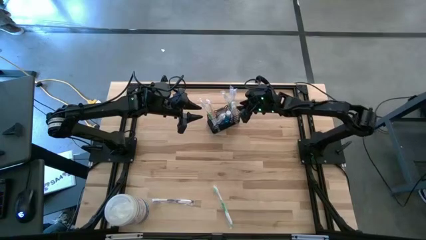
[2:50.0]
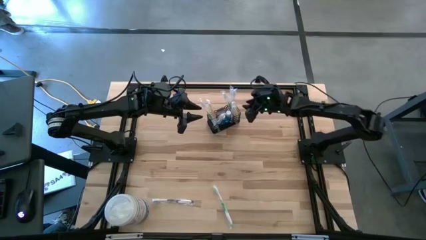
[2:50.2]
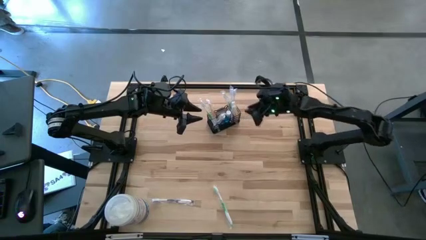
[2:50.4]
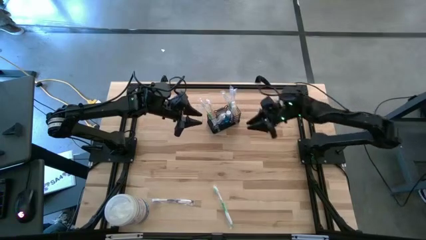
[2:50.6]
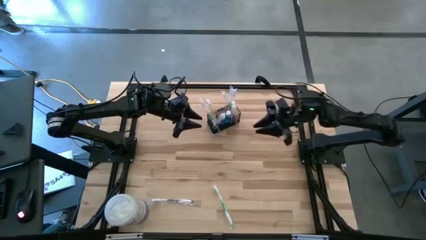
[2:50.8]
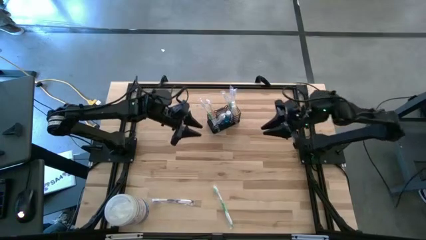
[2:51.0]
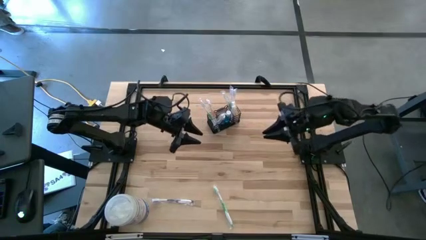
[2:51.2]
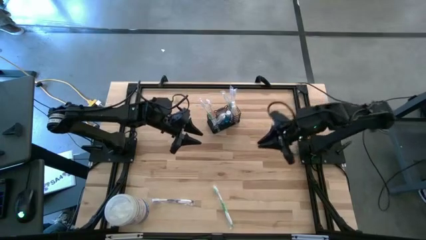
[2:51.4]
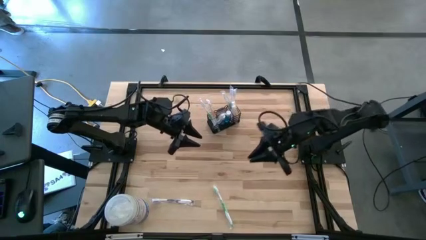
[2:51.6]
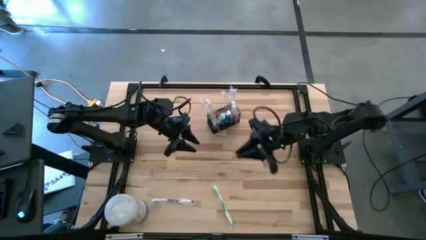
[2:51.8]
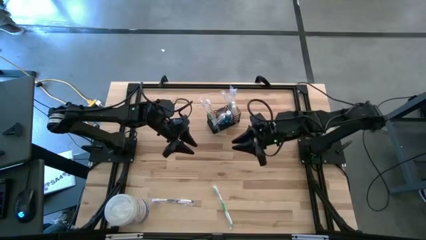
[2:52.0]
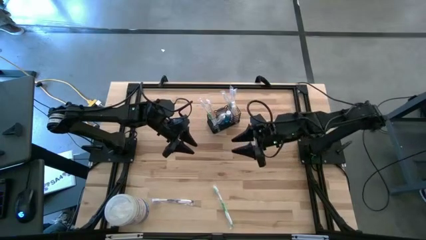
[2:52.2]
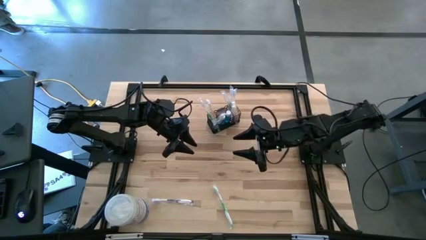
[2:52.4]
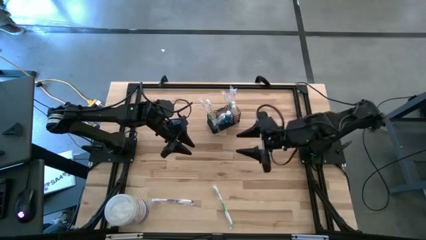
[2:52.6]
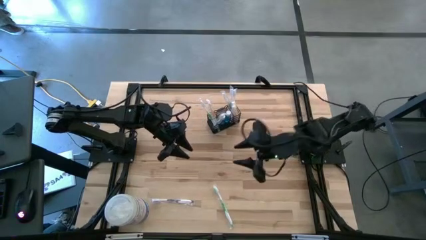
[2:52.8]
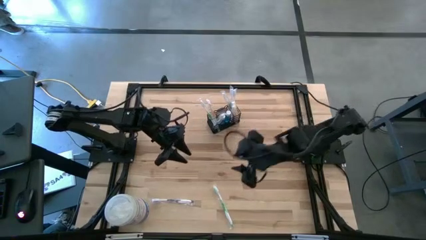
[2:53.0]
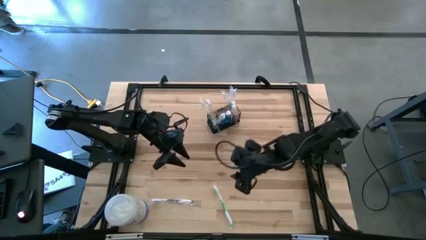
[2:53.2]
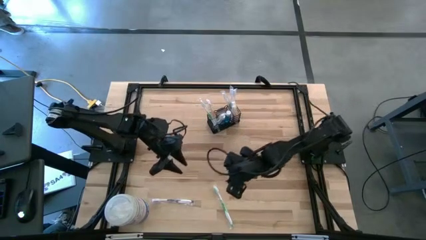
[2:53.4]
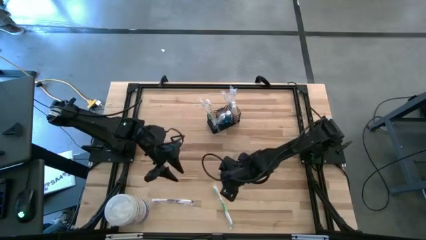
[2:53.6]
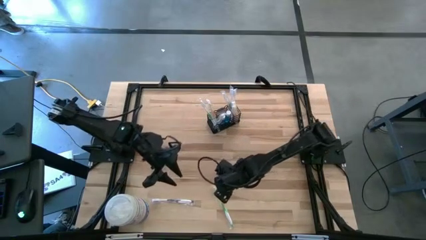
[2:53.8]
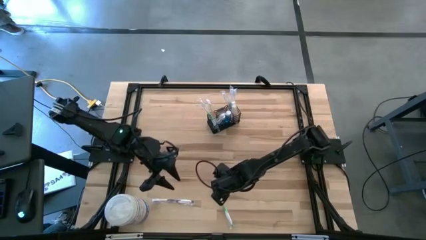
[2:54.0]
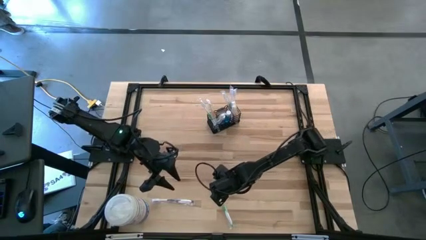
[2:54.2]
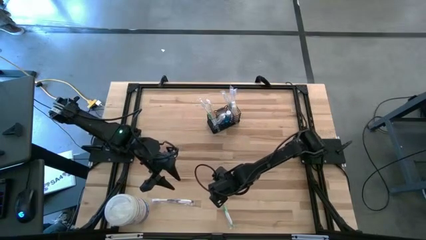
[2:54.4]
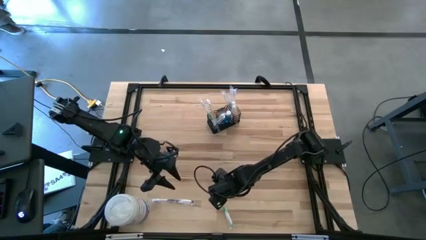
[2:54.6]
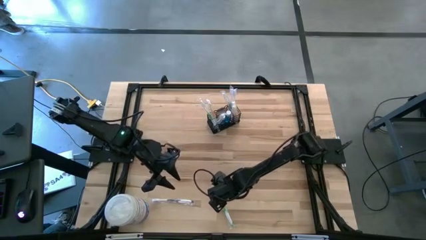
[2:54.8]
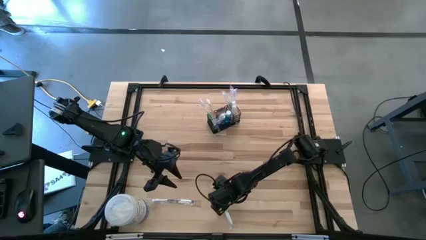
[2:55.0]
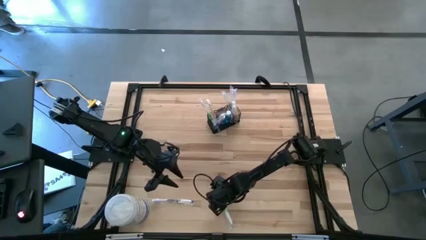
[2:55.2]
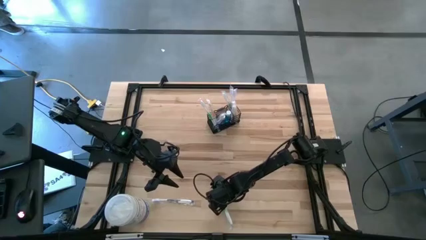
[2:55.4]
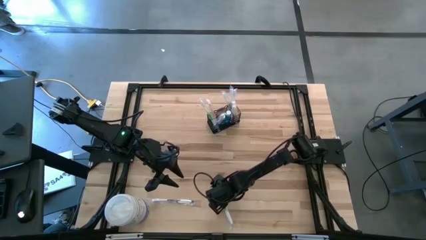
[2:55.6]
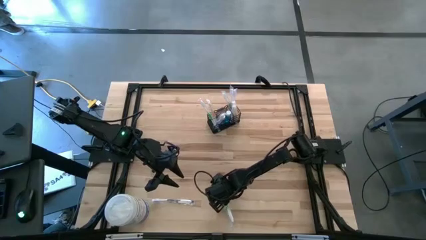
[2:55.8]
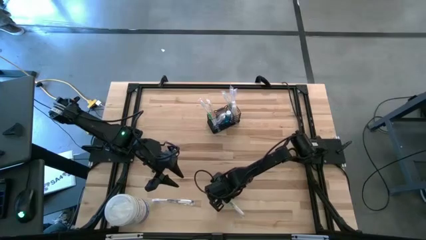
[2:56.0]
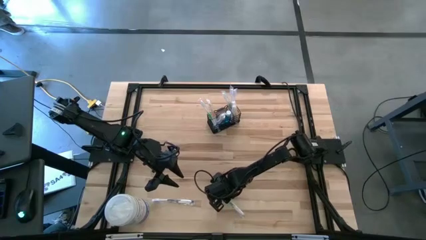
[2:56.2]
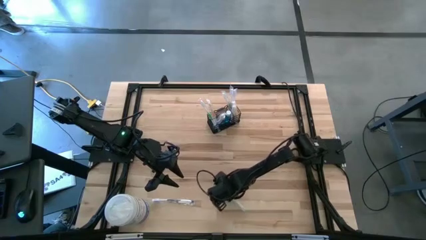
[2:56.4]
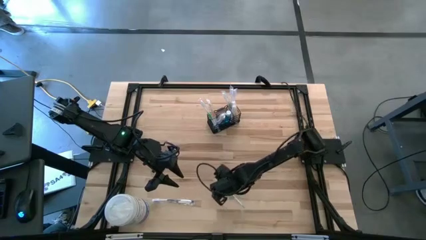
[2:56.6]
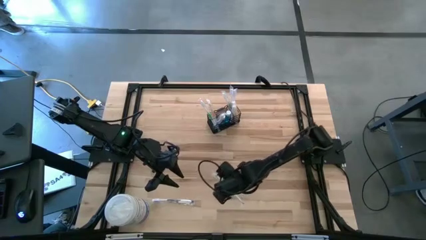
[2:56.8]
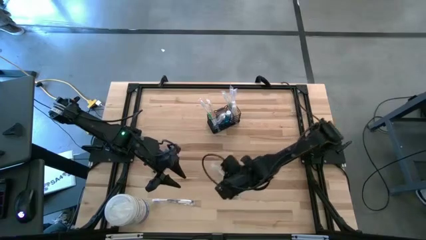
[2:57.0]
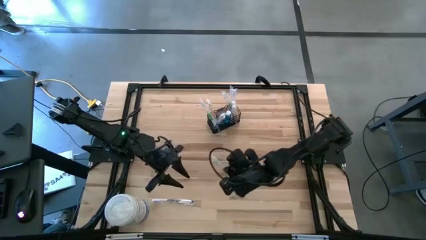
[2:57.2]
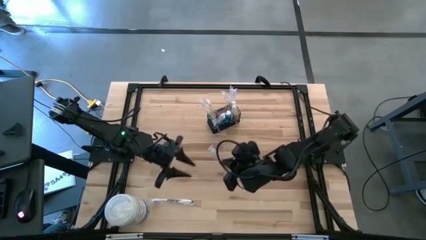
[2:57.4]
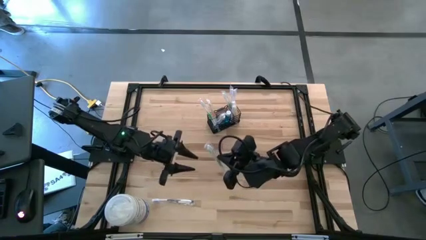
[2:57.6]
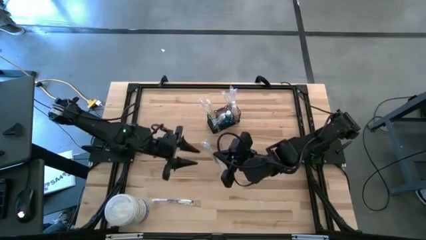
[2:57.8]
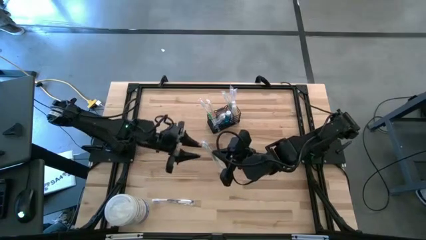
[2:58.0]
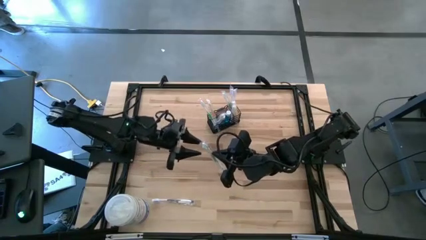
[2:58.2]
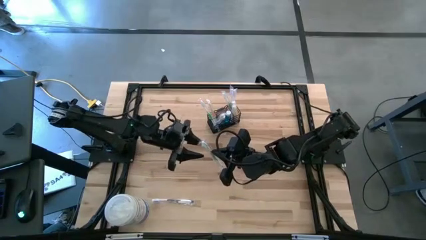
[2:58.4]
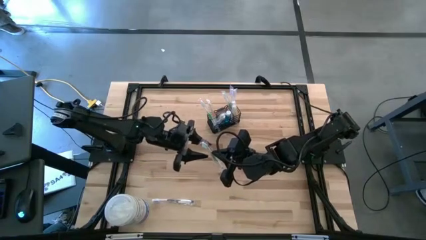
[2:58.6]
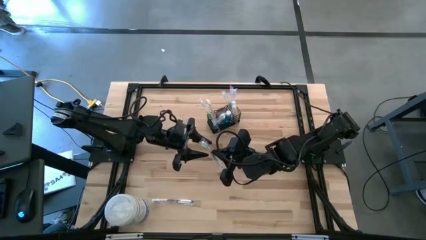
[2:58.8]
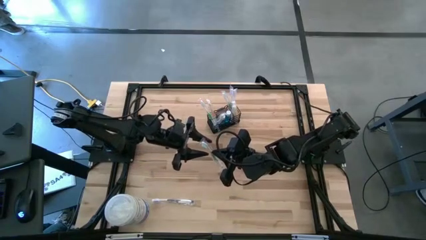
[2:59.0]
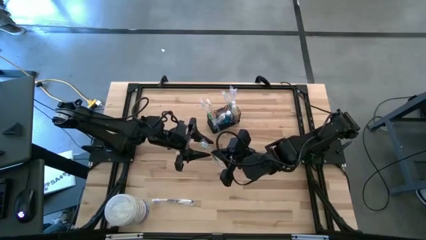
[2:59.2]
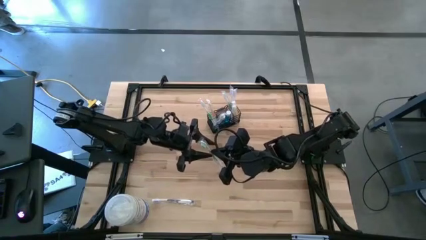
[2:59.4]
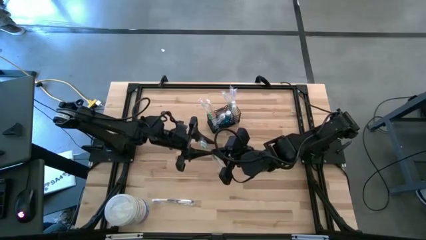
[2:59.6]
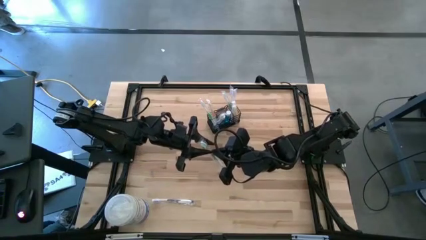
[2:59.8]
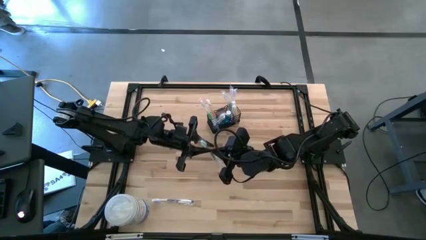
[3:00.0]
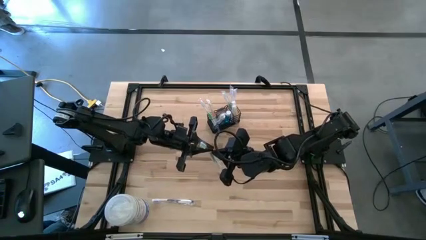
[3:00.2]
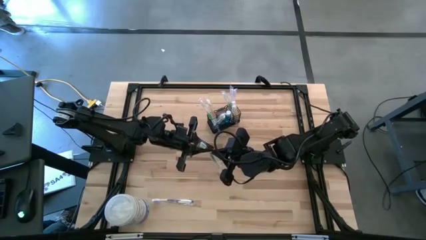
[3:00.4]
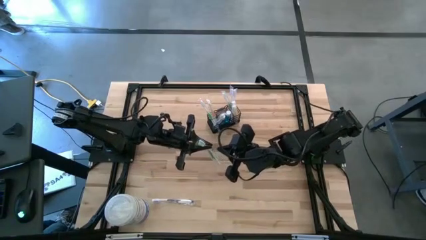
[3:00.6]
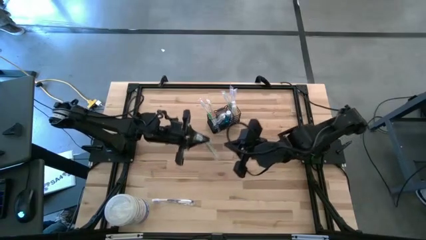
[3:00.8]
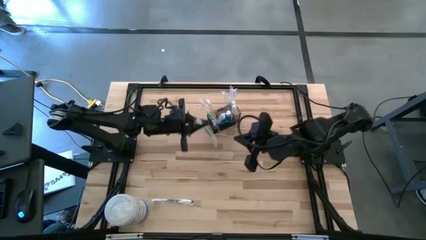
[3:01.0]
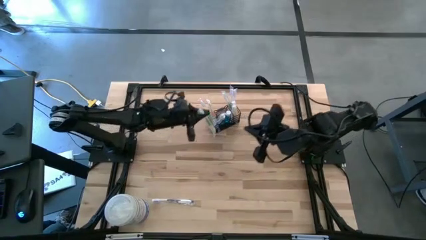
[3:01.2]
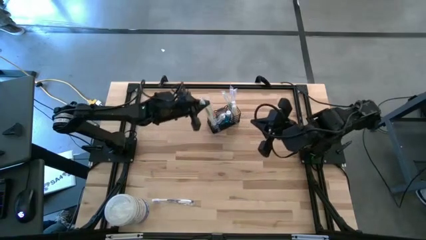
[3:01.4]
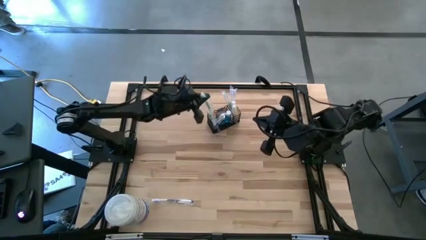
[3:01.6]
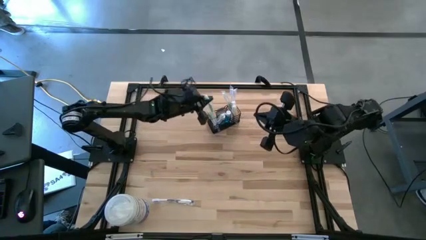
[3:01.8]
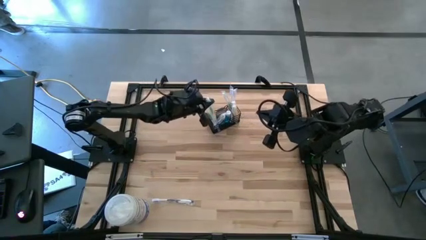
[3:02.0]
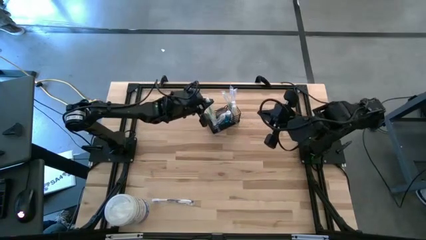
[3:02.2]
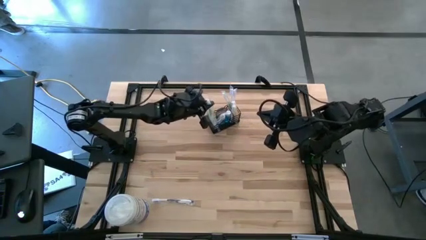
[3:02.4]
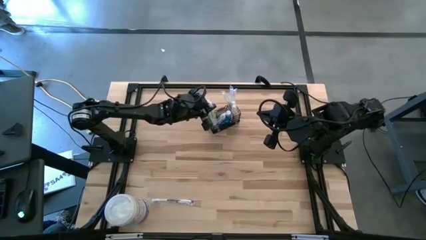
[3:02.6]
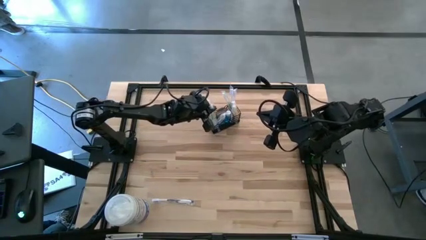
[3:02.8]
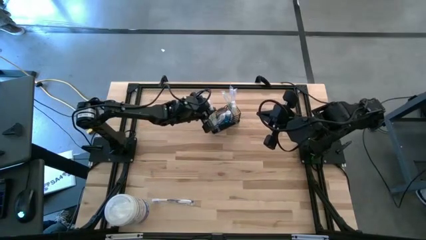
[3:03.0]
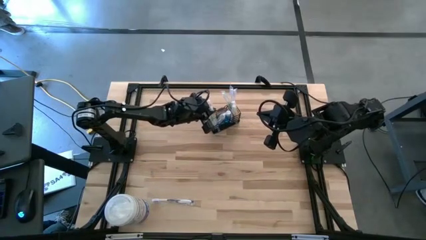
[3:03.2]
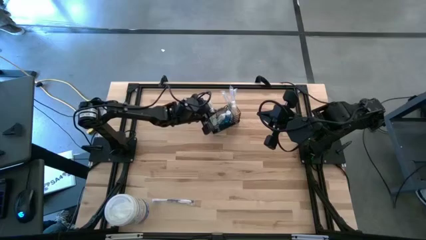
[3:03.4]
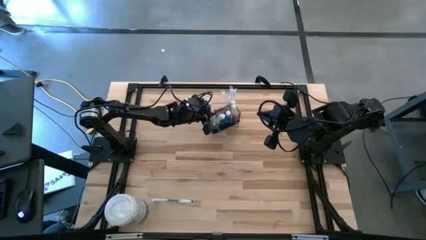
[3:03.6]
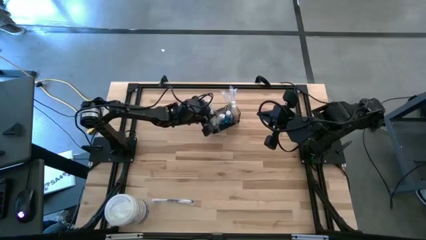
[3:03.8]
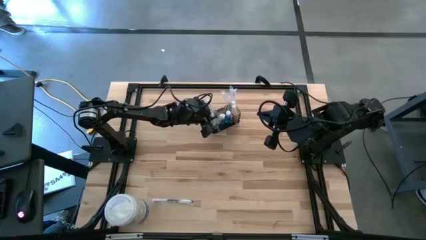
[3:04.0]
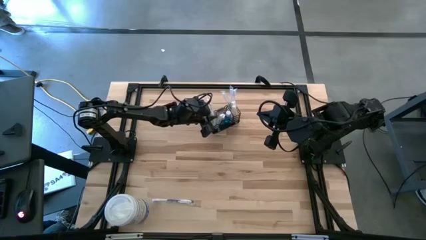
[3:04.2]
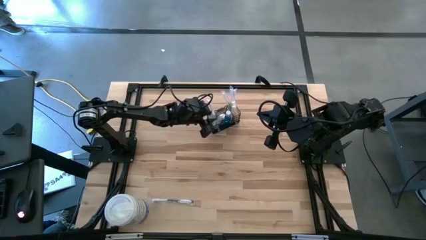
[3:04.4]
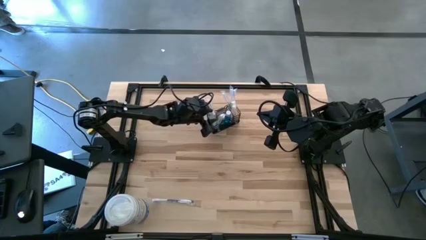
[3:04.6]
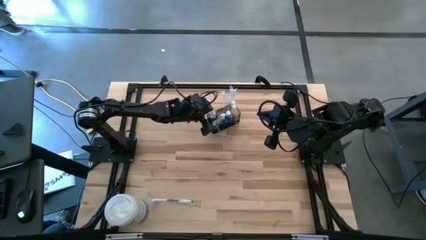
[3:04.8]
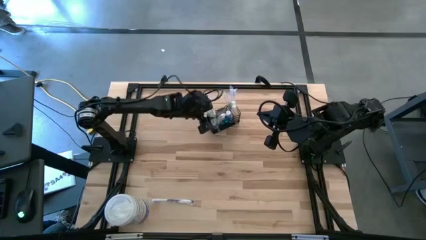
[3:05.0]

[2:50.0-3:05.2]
Task: Pick & Place toothbrushing station
Put the green toothbrush into the mesh organizer

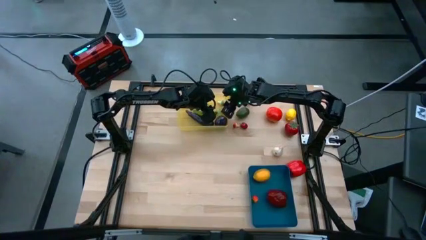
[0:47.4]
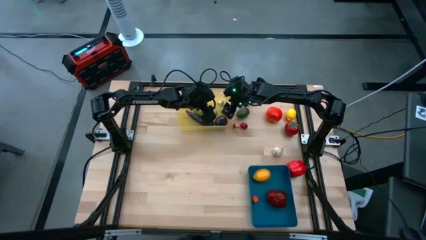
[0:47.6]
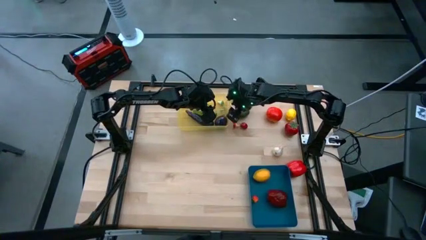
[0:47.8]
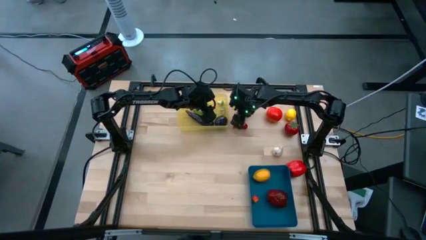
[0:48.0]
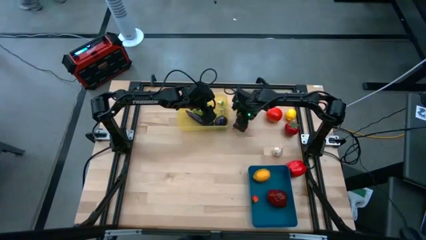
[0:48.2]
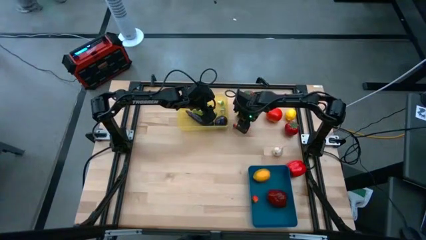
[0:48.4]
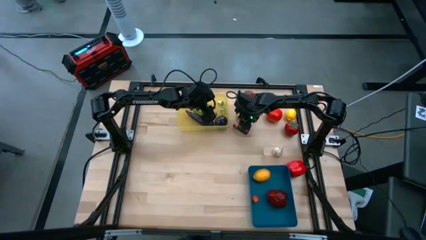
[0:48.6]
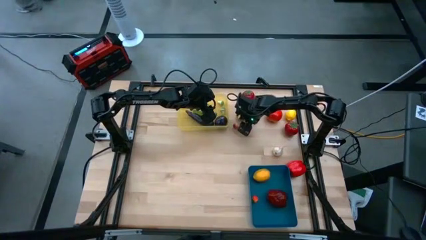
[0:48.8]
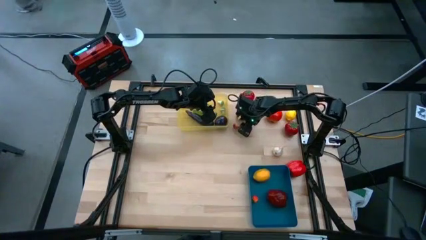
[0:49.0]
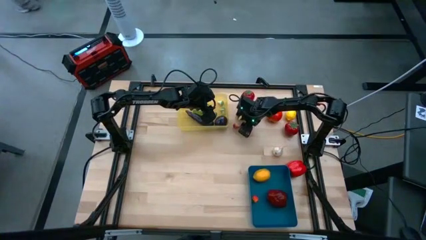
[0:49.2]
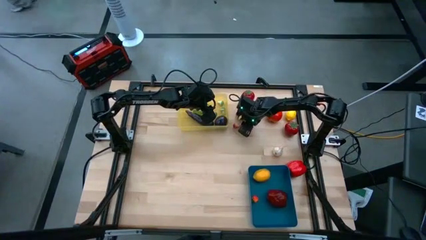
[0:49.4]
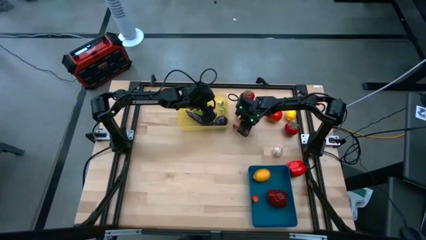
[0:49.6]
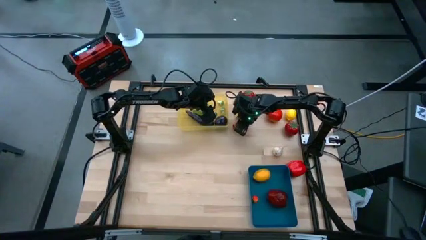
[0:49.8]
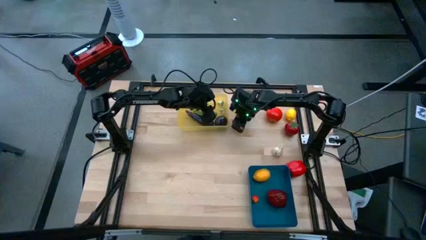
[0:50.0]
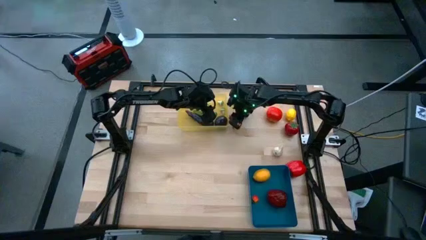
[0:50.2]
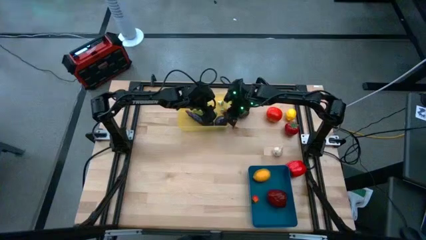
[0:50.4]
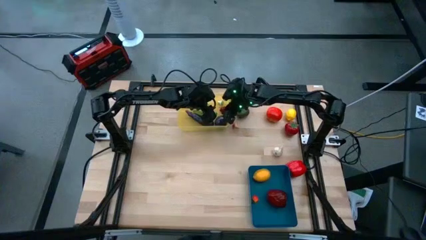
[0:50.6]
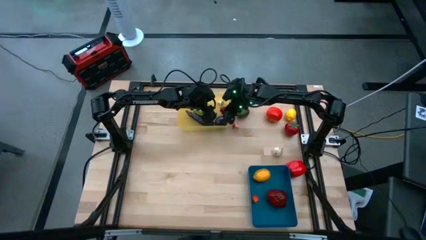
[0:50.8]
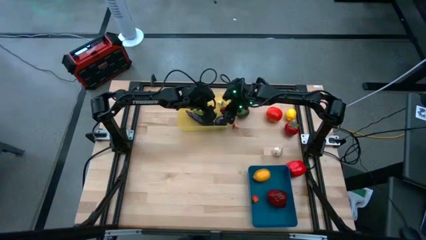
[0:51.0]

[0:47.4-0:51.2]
Task: Sort produce into baskets
Put the red chili into the yellow bin
